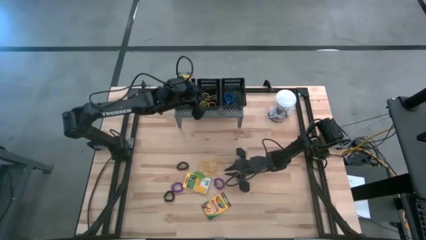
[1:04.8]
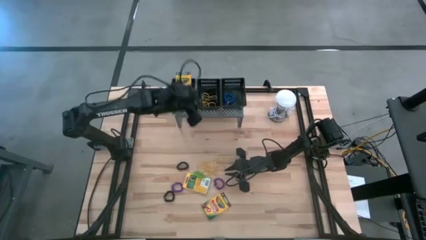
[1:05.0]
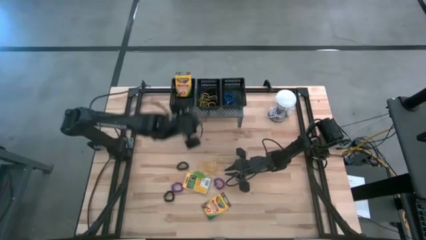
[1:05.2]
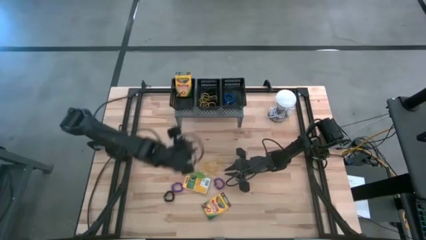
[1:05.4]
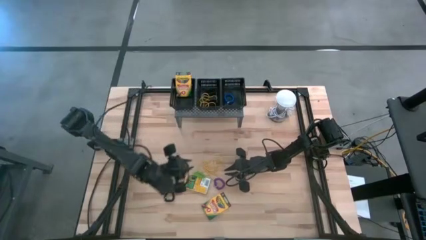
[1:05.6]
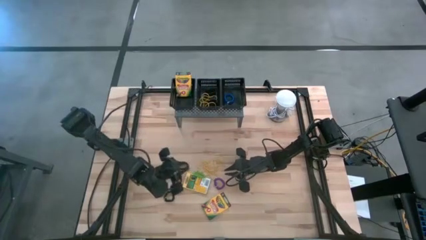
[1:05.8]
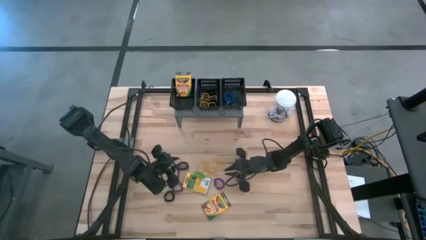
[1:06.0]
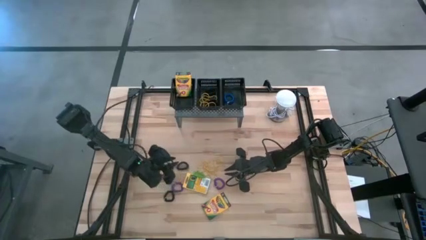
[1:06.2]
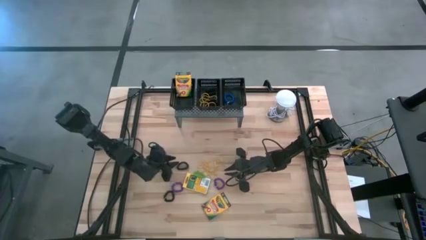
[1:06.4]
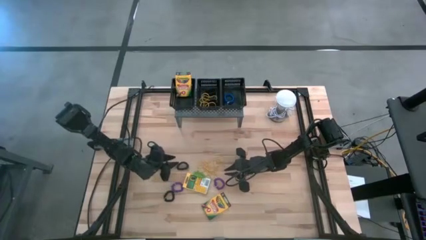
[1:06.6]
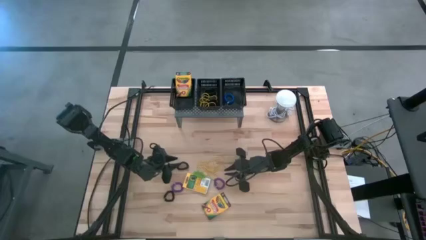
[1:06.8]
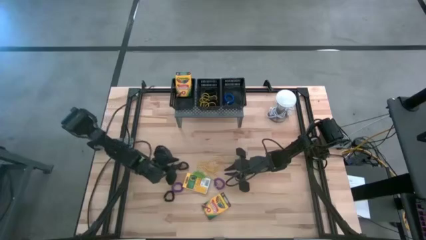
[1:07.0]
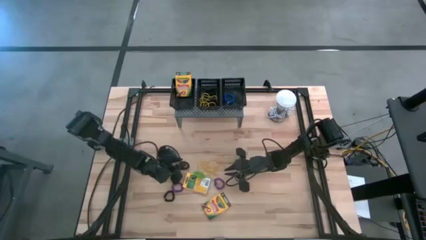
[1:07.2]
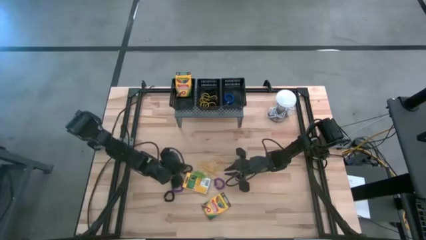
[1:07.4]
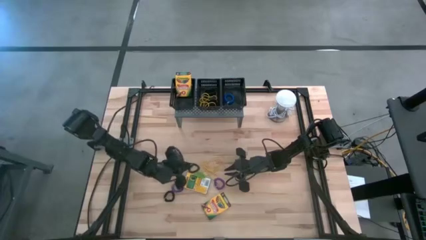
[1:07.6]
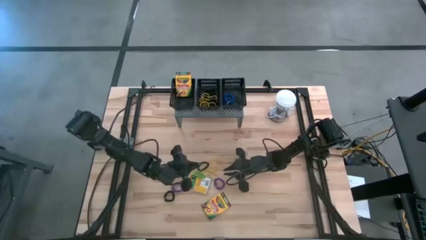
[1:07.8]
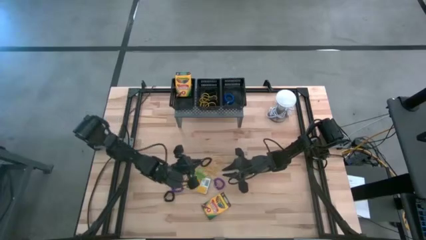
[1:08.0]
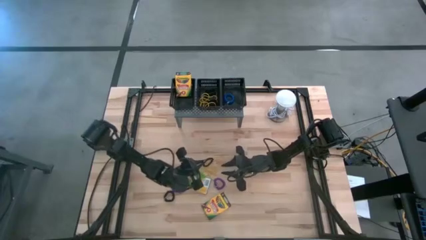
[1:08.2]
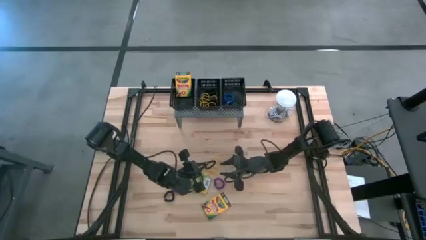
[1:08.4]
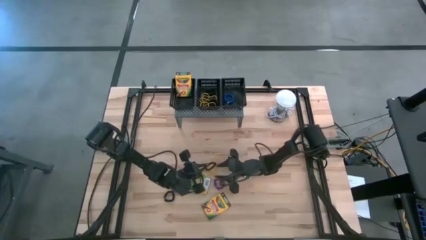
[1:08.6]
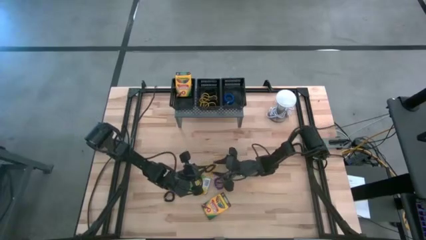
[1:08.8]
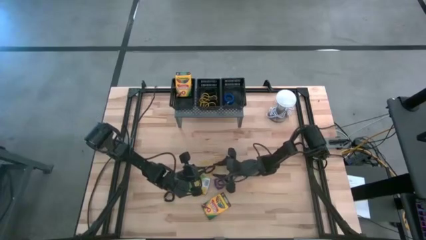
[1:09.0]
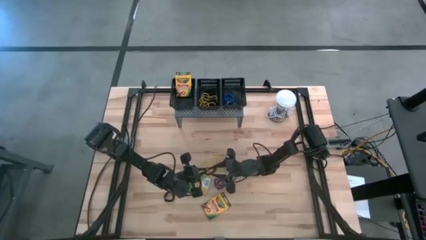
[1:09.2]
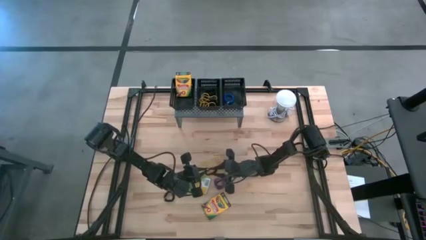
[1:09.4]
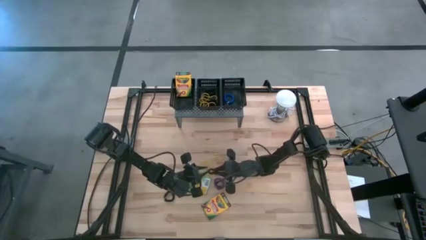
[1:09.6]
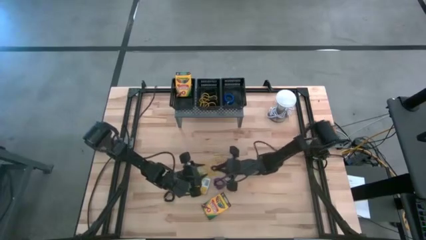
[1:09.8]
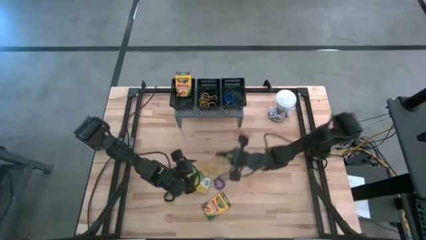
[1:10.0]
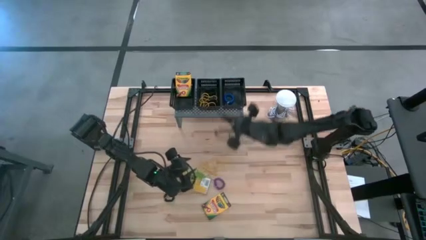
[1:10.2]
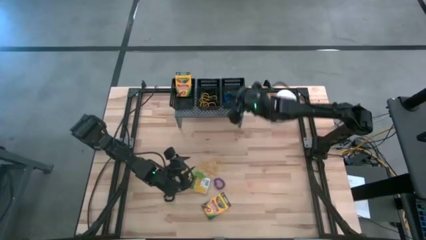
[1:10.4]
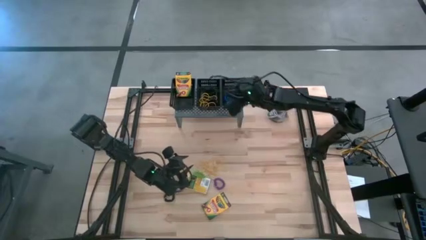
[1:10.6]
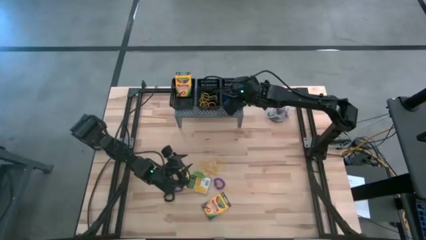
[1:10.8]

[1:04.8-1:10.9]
Task: Pick & Place Office Desk Supplies
Put the black spring keychain in the right black bin on the shelf

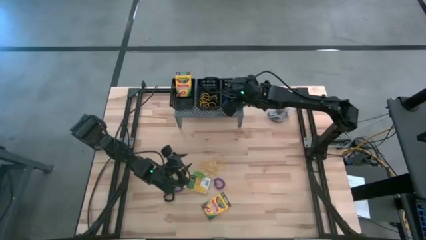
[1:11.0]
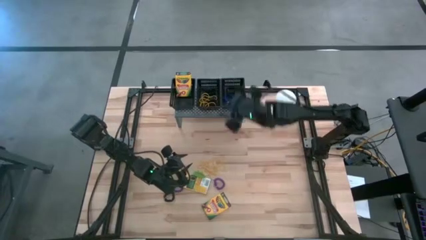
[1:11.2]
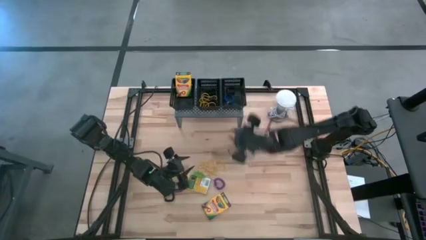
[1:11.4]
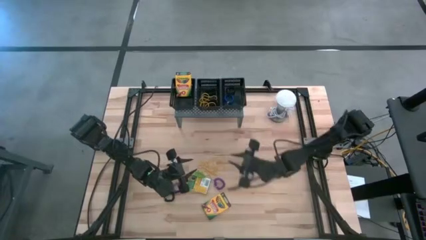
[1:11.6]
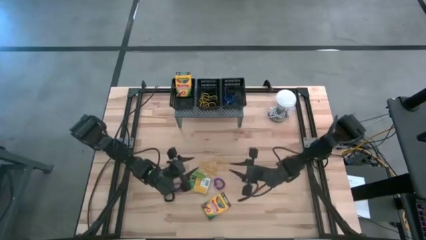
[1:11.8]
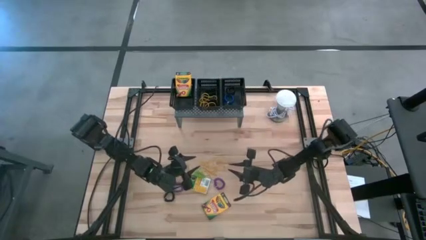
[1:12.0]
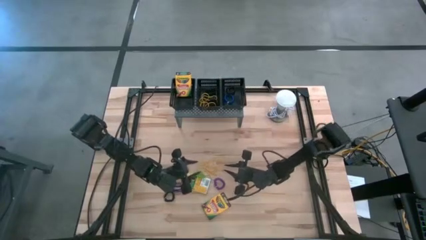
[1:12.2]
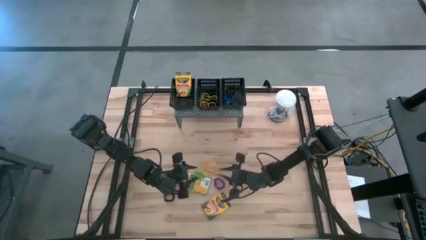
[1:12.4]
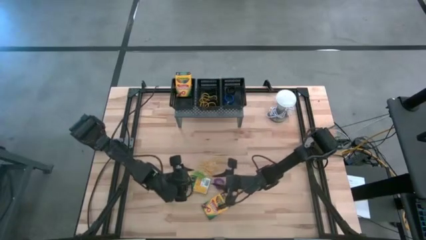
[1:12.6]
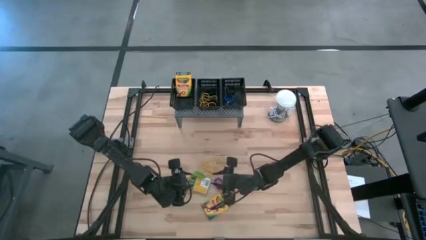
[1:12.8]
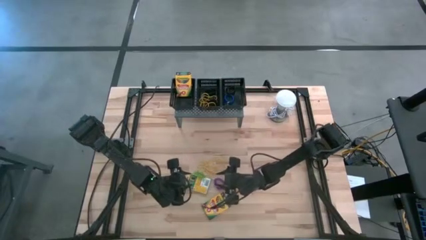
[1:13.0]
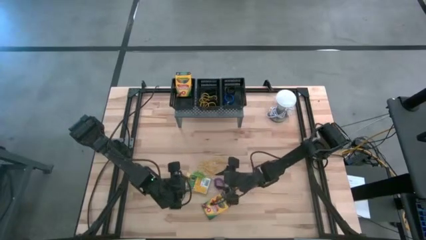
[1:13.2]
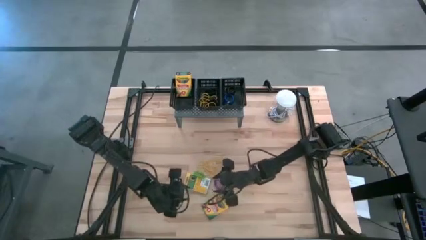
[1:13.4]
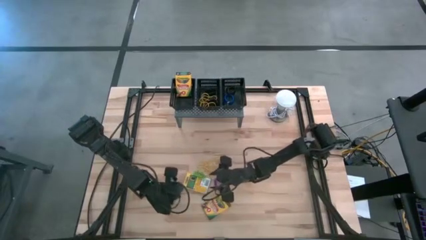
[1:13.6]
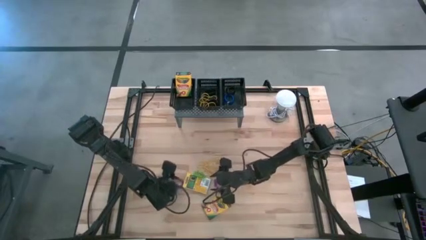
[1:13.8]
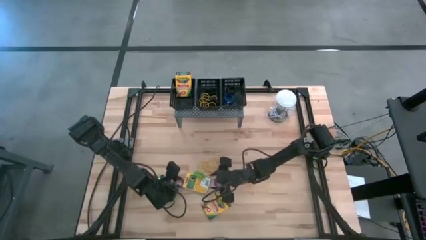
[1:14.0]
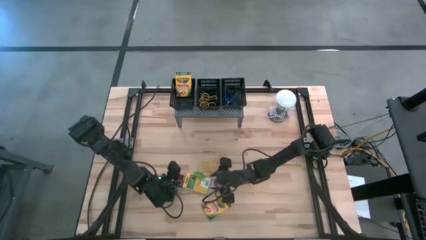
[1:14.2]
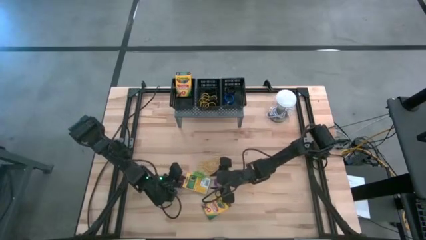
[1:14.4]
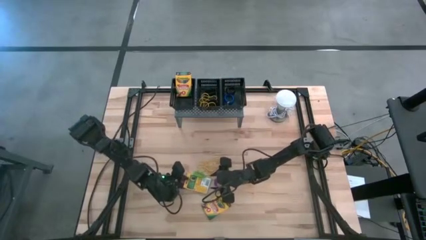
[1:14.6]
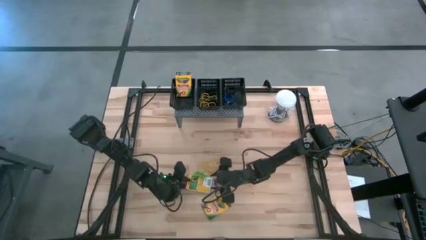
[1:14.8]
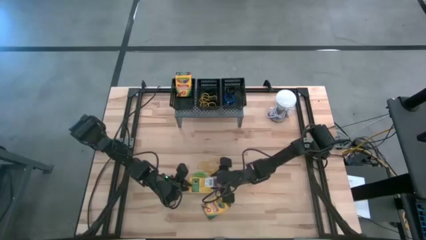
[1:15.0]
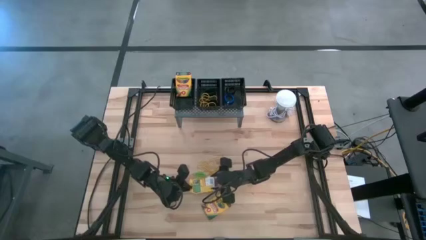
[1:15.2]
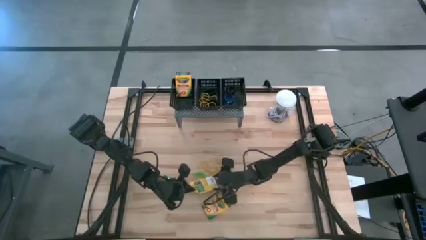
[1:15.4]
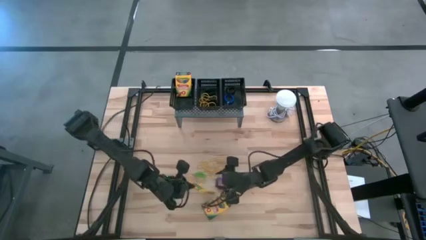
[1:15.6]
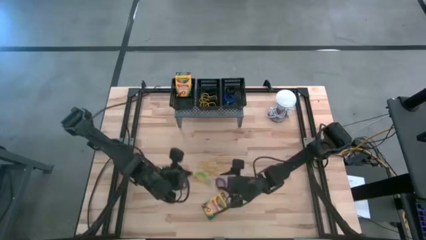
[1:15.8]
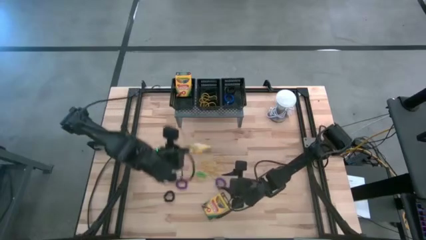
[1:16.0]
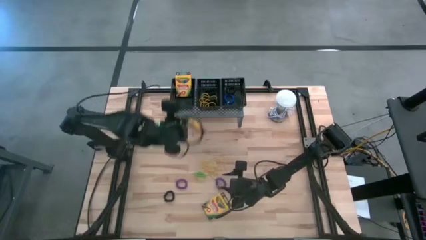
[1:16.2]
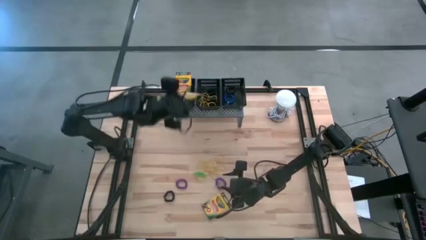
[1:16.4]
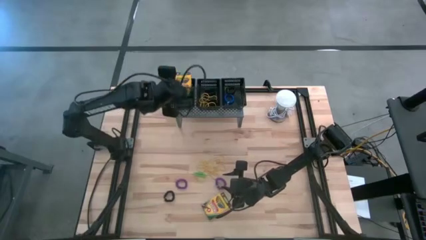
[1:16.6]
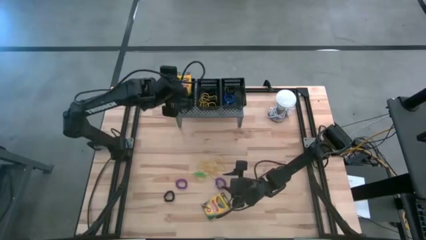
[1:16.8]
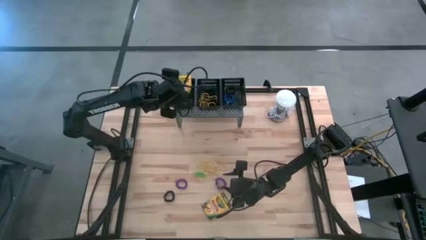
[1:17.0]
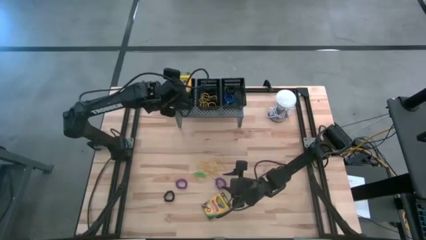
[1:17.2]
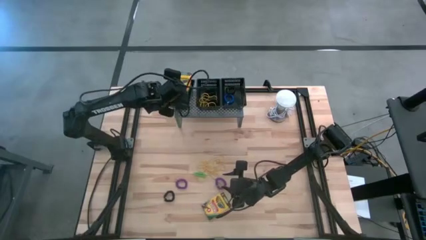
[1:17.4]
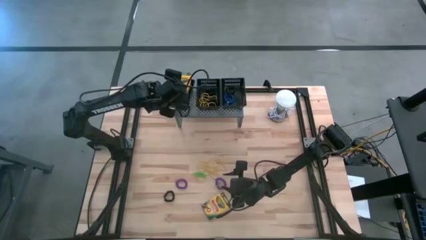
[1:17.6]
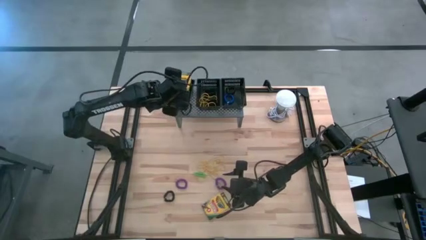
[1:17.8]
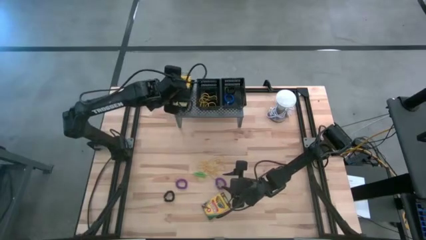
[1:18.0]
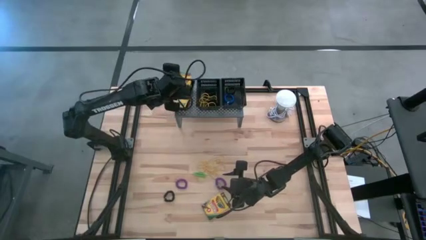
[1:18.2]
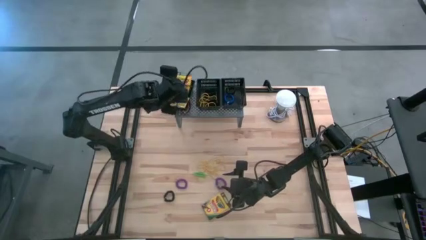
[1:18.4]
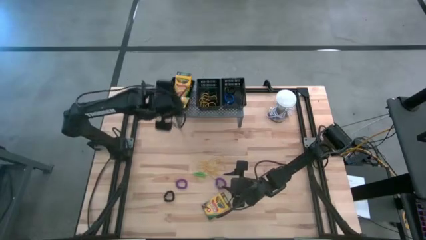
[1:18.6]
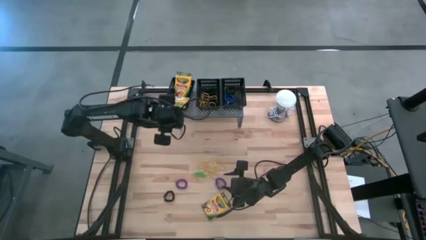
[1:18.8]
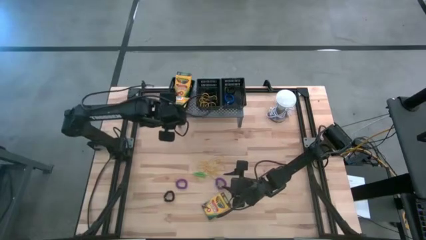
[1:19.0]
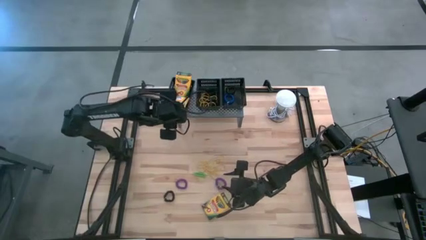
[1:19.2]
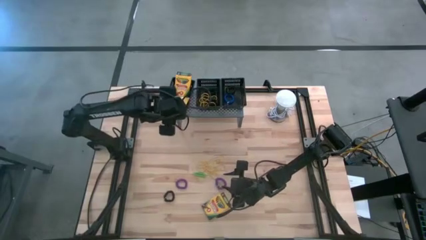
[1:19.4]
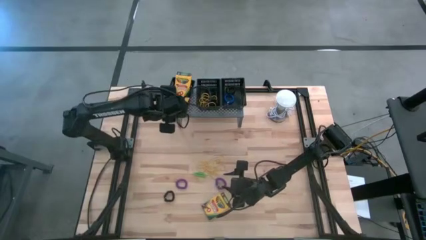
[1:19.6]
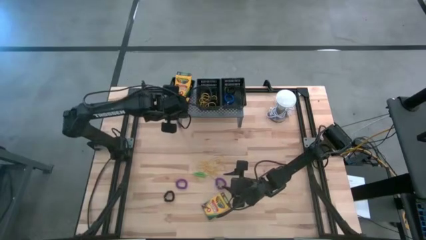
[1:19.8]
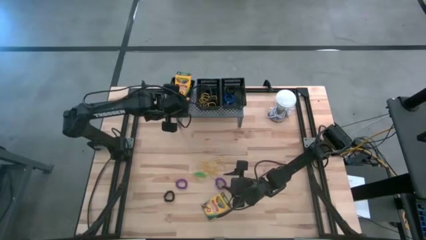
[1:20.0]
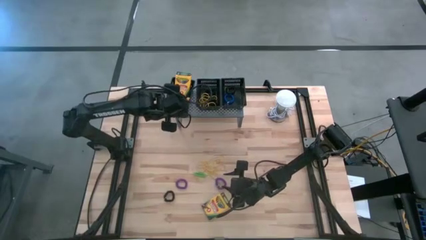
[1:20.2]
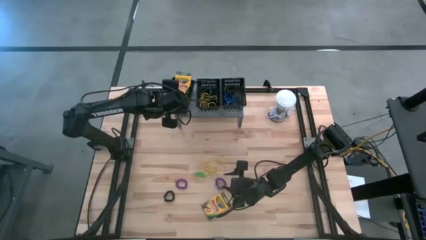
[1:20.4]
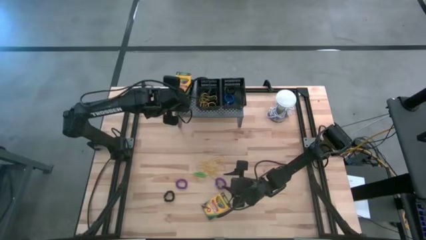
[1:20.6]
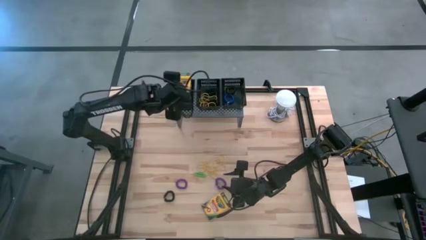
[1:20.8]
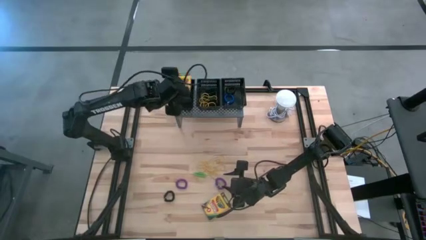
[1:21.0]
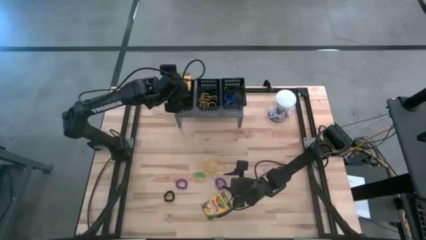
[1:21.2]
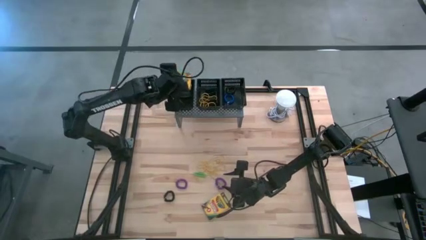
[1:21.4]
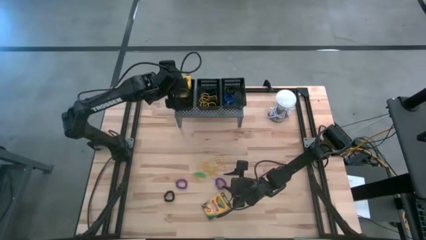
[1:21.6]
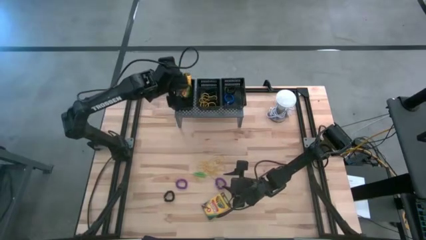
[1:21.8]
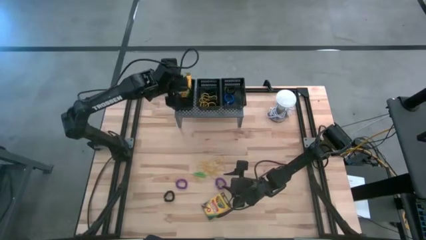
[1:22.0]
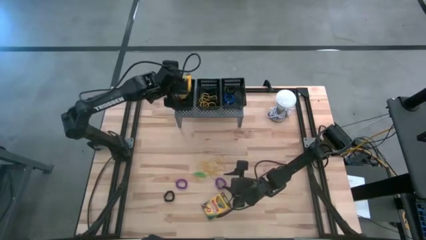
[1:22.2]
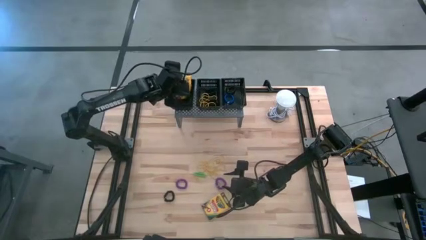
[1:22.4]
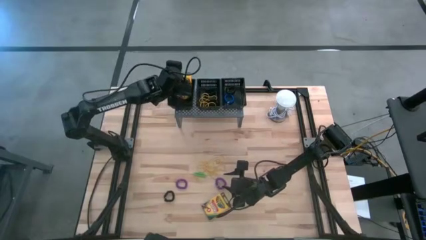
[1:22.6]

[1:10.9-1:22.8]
Put the yellow crayon box in the left black bin on the shelf

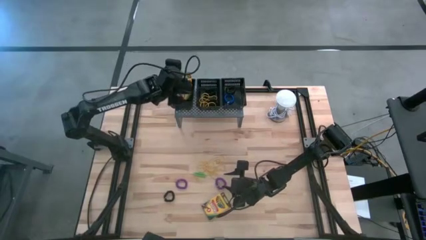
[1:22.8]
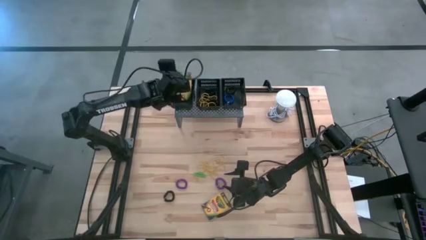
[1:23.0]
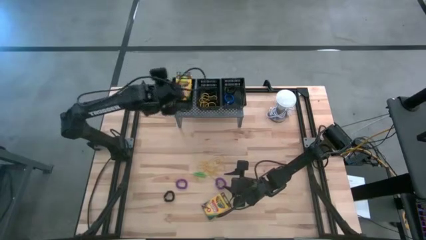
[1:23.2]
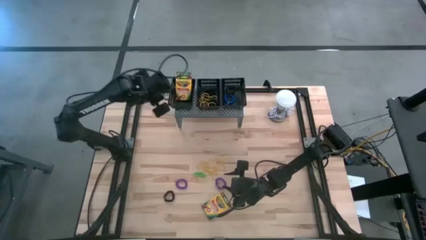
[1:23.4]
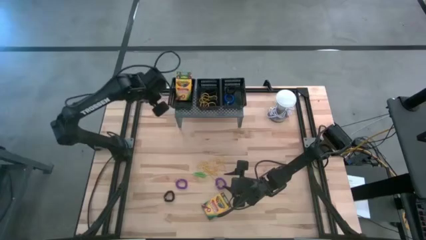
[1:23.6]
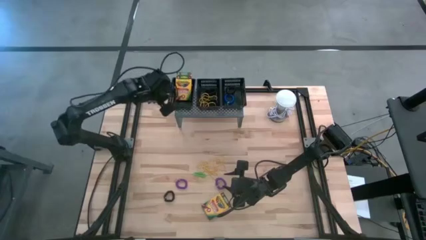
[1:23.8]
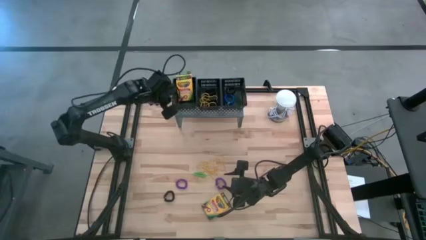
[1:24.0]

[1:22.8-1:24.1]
Adjust the black bin on the shelf
